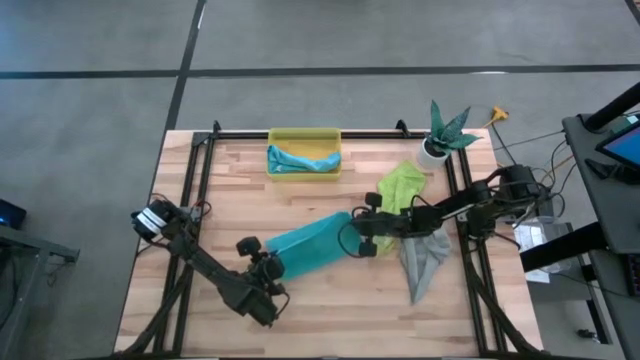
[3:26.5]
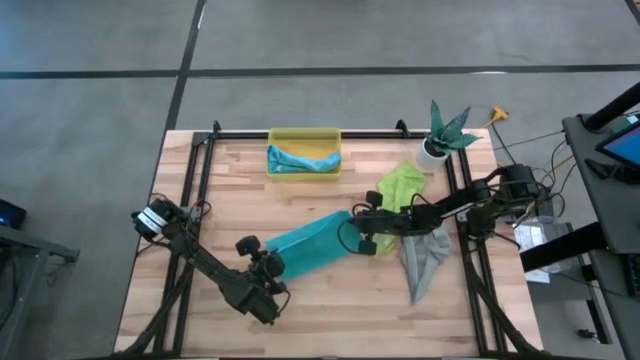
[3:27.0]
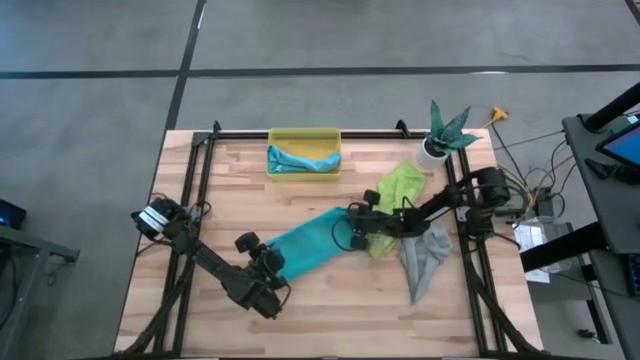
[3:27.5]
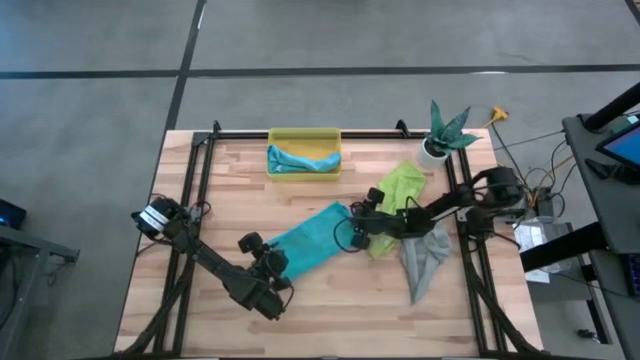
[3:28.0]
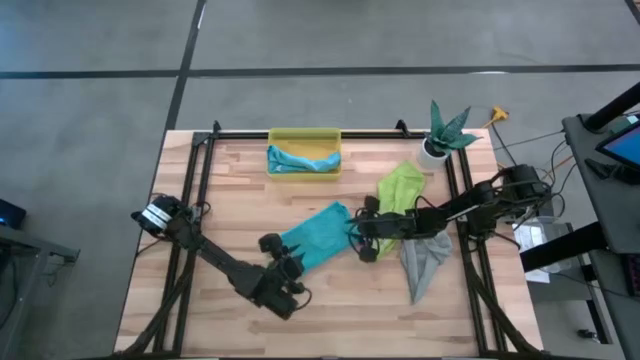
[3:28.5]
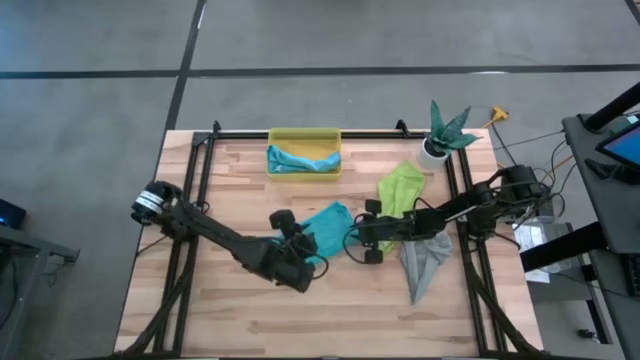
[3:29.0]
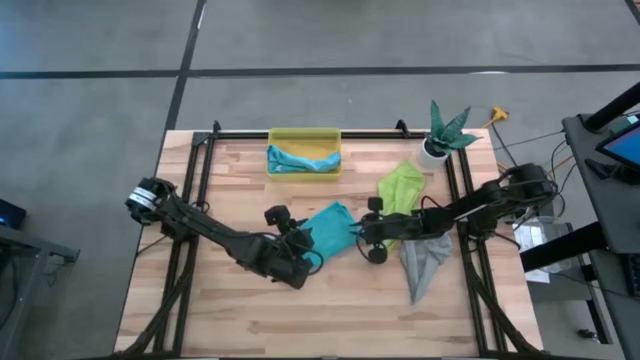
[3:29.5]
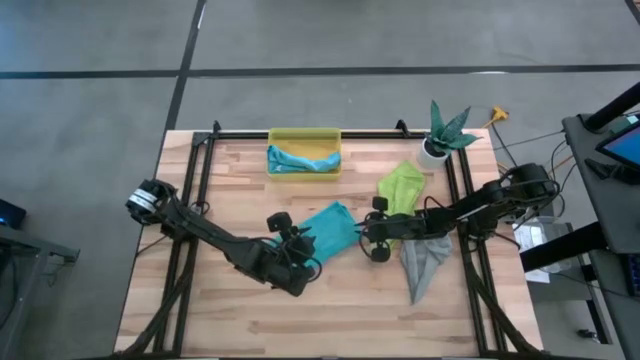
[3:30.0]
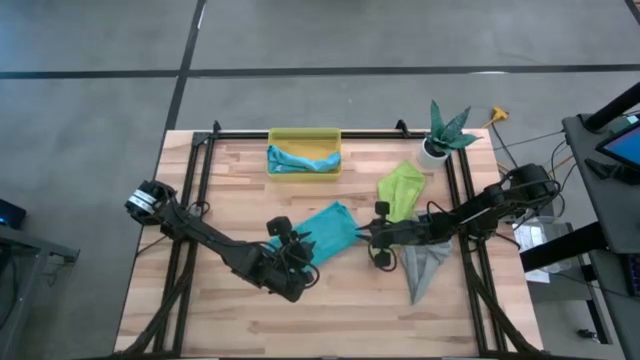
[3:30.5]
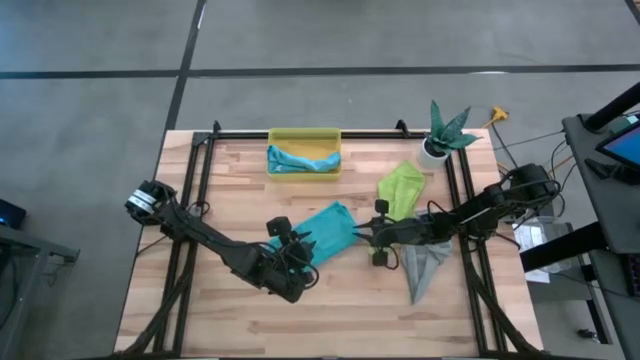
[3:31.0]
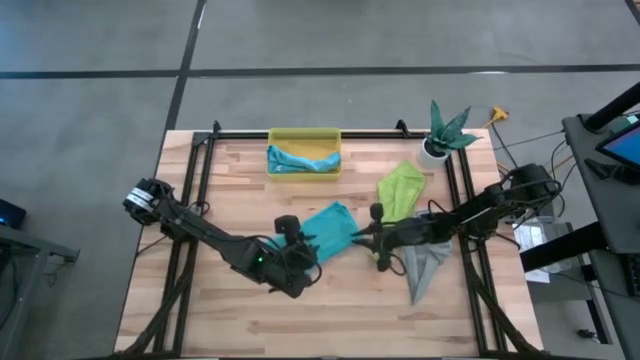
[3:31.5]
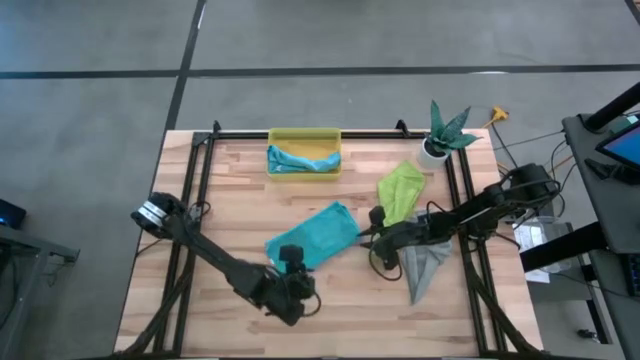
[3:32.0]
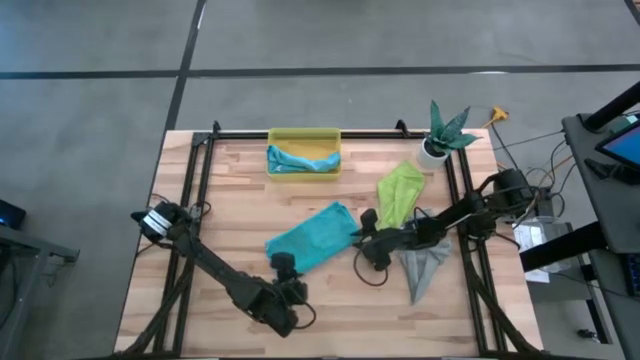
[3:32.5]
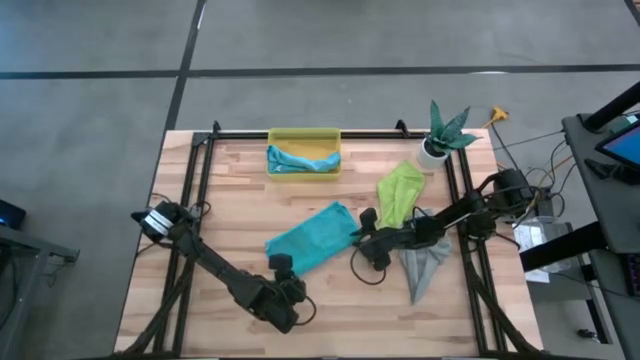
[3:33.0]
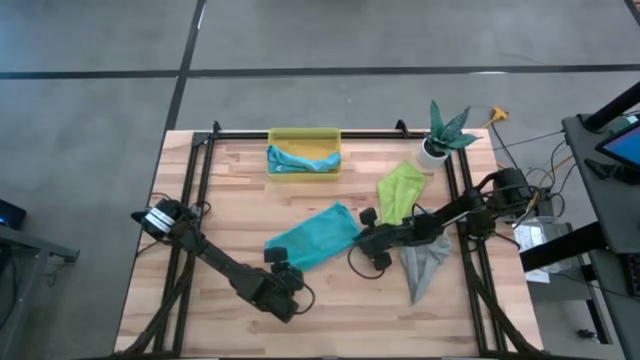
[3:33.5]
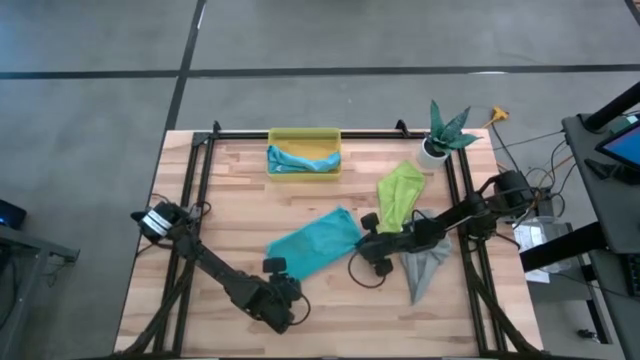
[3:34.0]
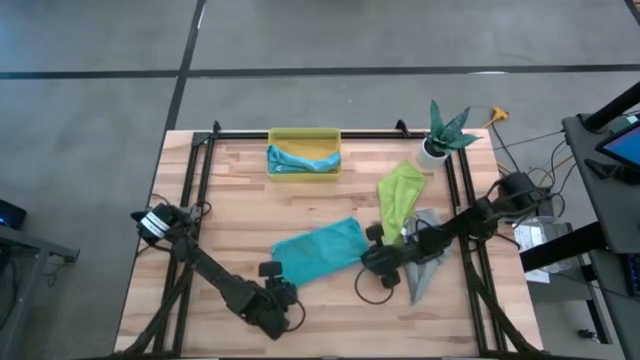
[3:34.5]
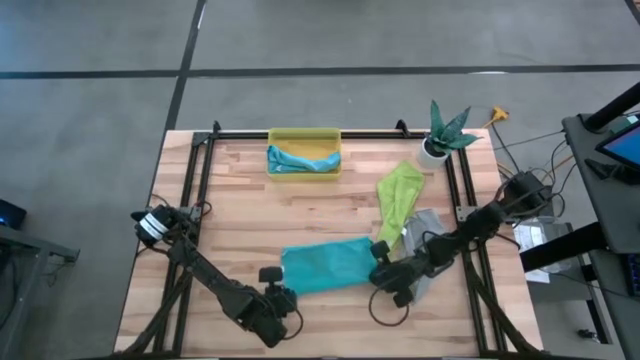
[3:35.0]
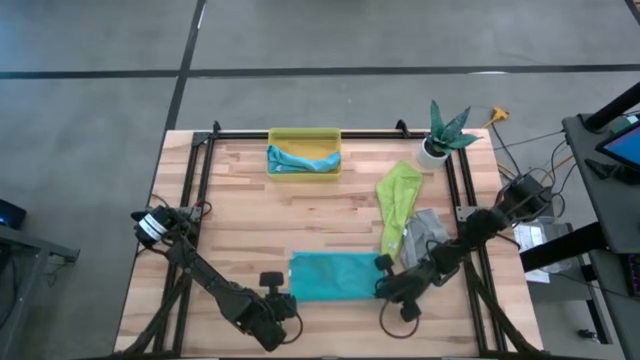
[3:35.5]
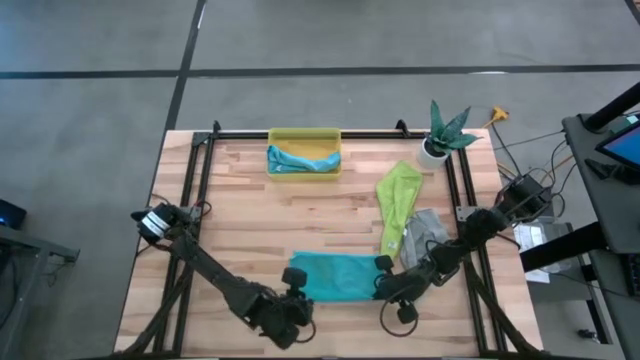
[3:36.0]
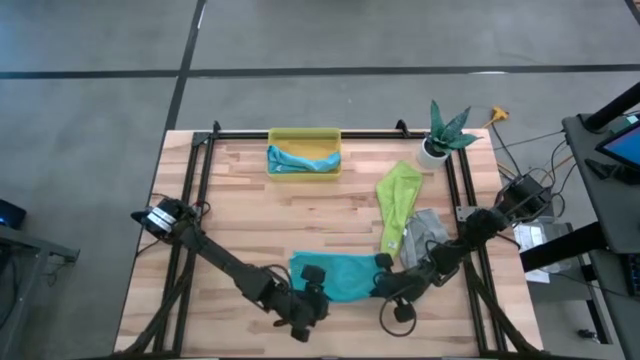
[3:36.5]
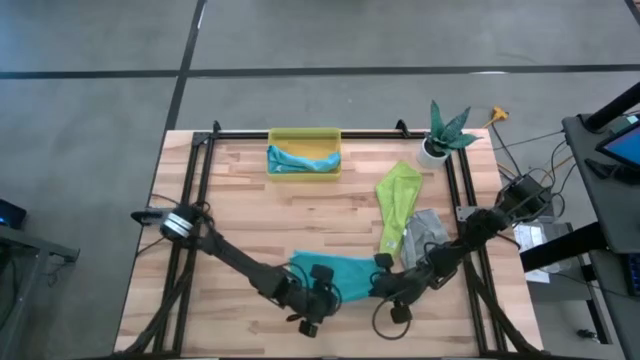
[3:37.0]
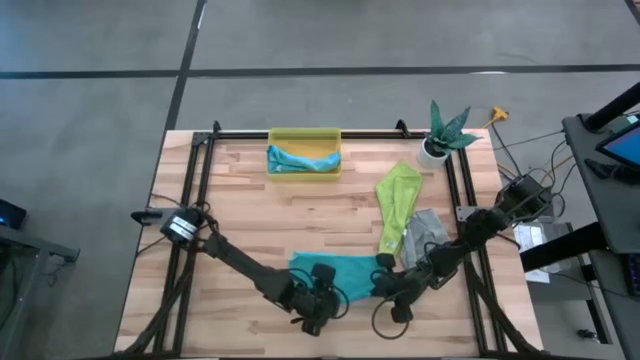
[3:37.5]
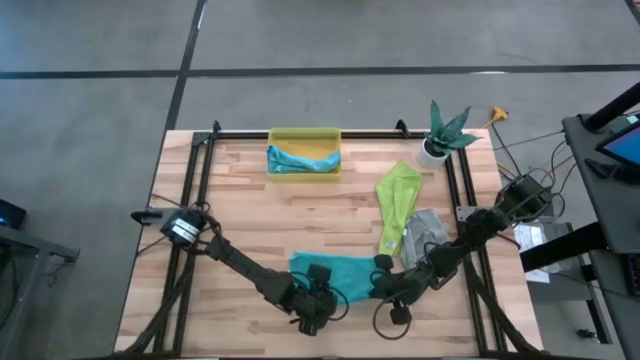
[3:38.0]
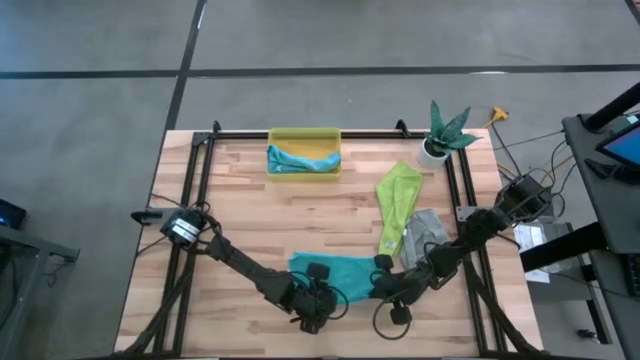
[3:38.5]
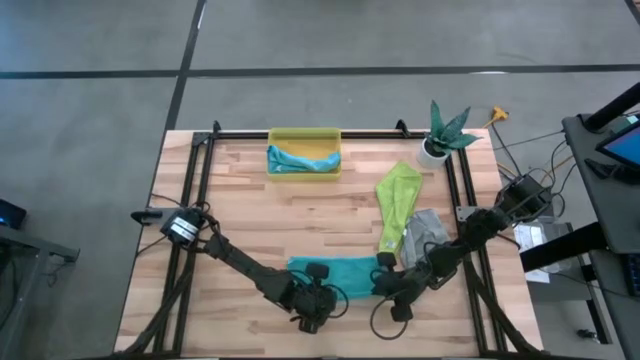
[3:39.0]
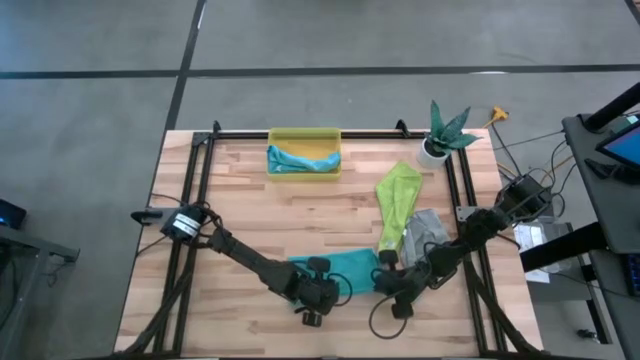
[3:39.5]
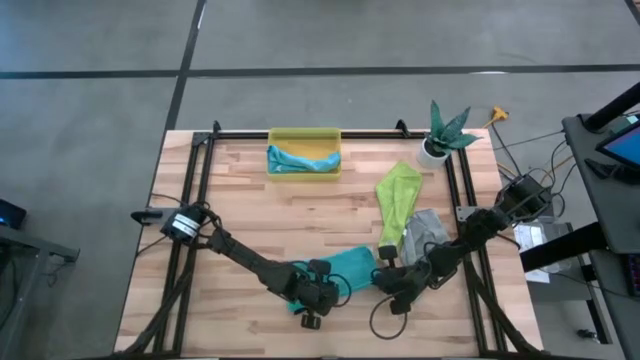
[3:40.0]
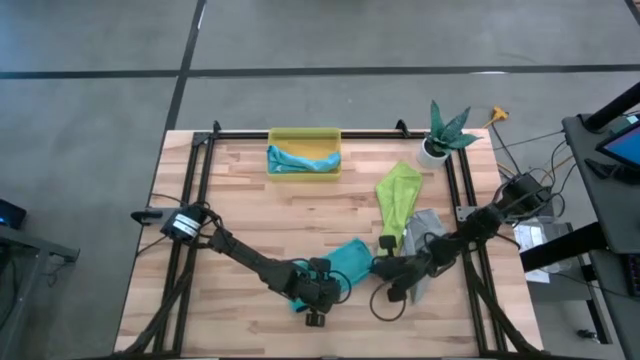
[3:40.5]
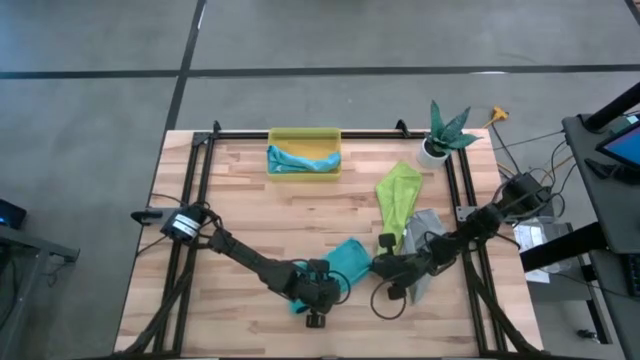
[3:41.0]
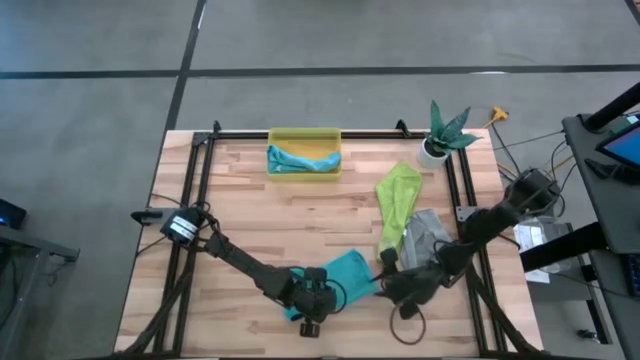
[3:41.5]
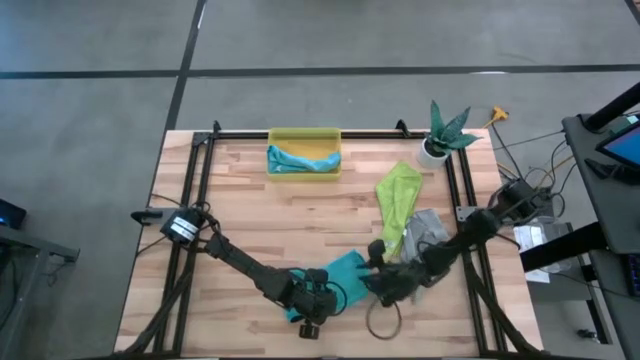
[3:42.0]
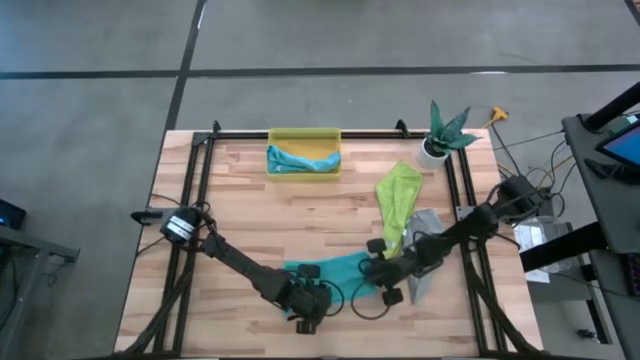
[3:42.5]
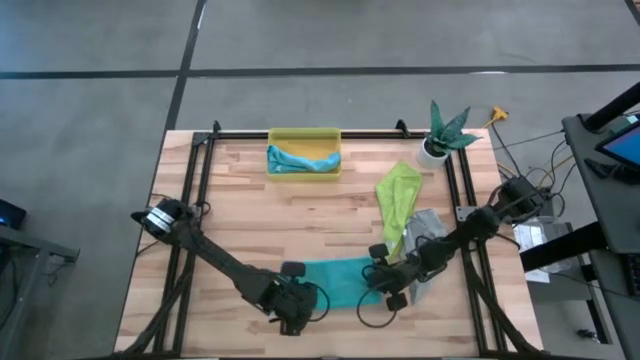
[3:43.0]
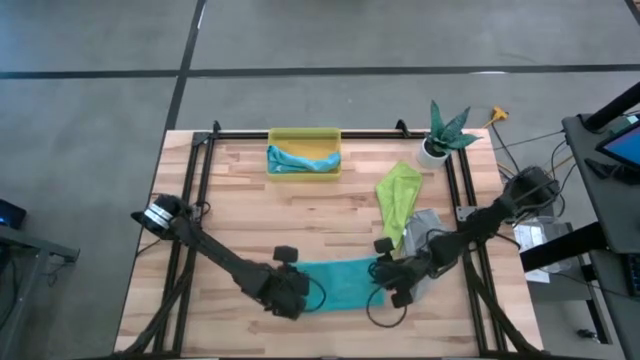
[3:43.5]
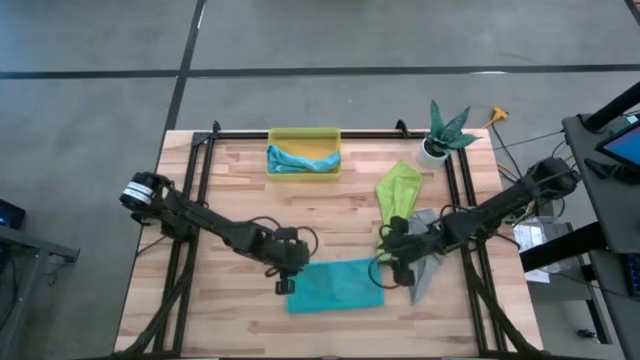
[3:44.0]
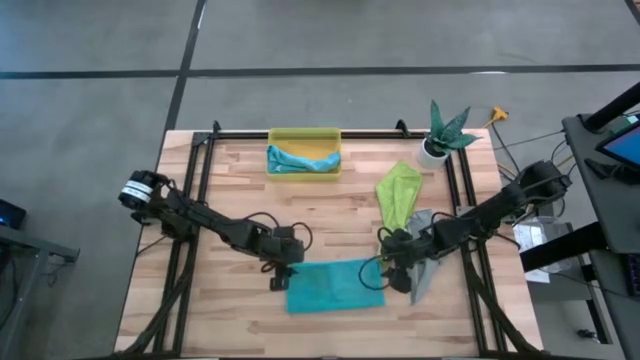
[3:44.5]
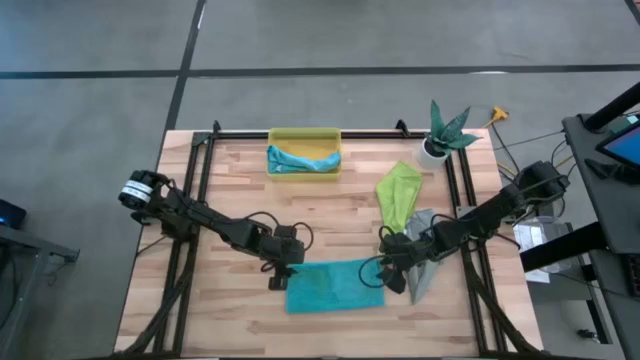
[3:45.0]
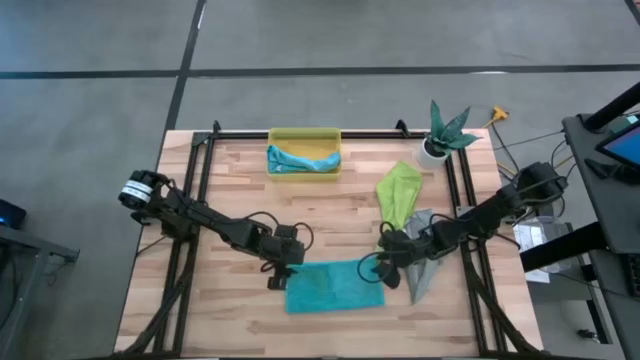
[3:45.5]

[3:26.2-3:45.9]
Task: Roll microfiber towels into tight, uniform cylinder then place into a basket
Roll the light blue towel
